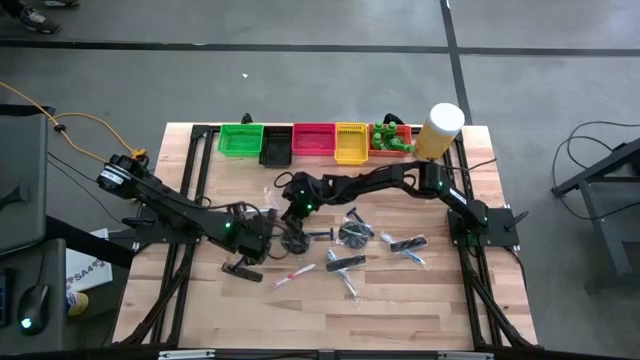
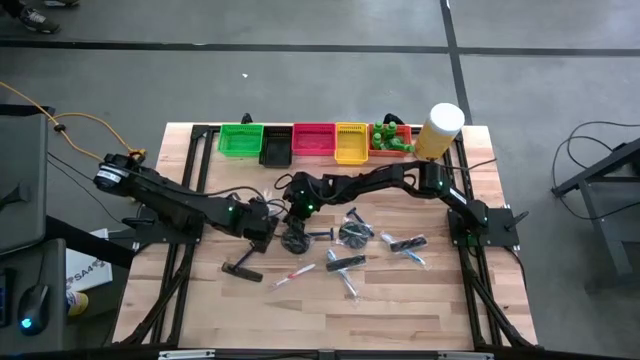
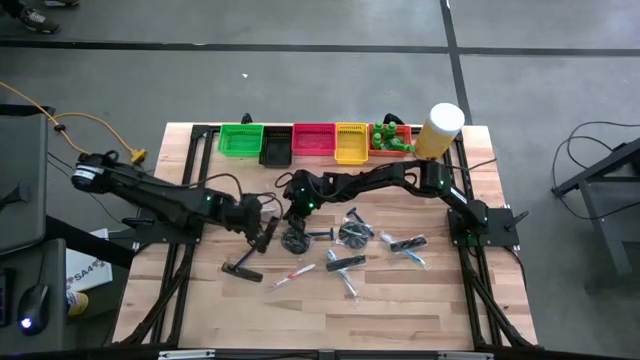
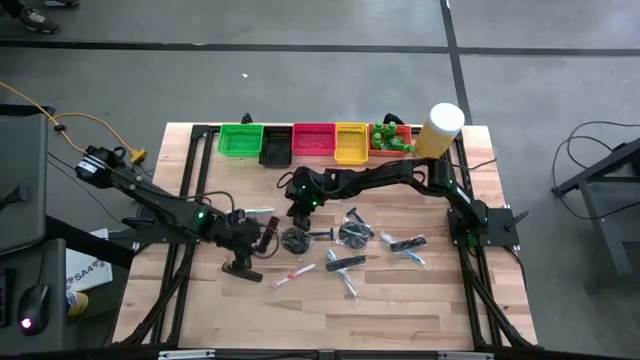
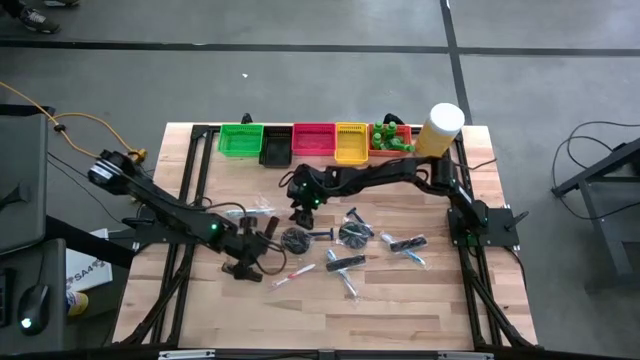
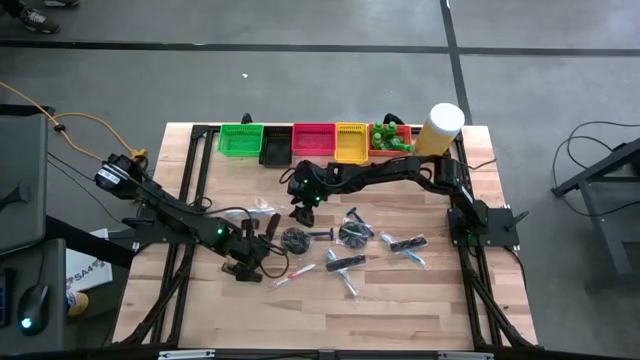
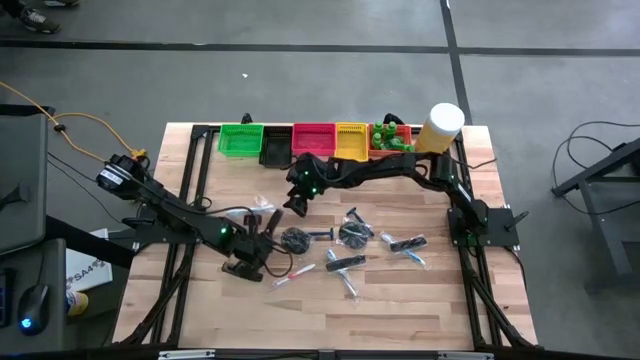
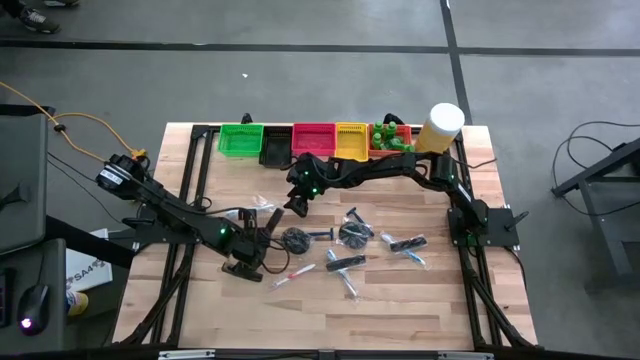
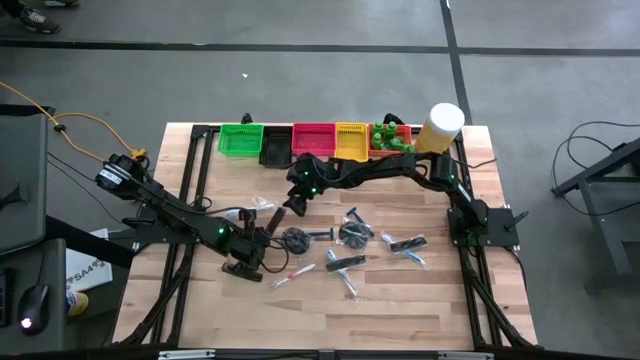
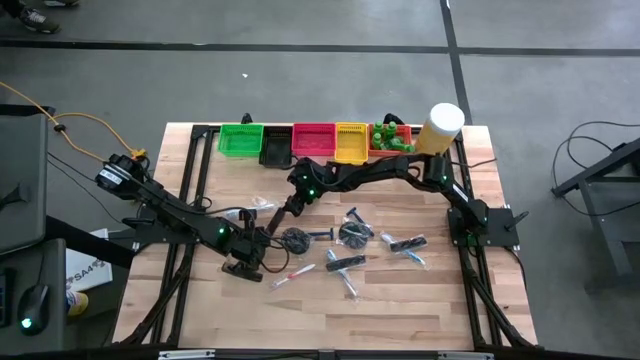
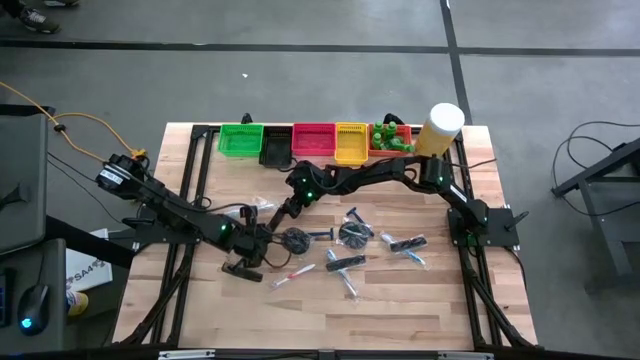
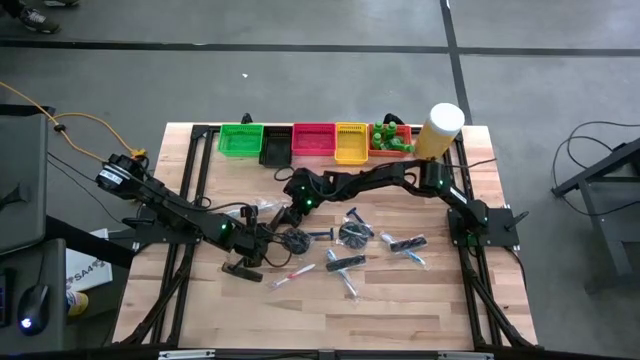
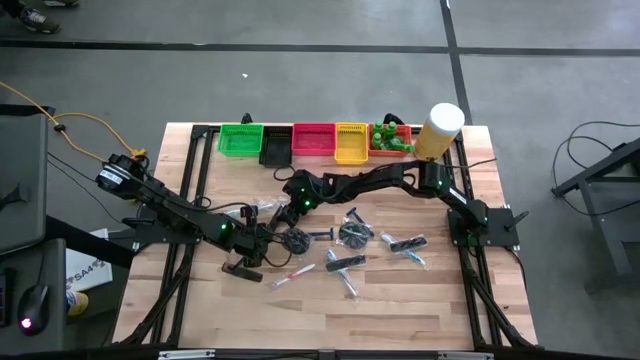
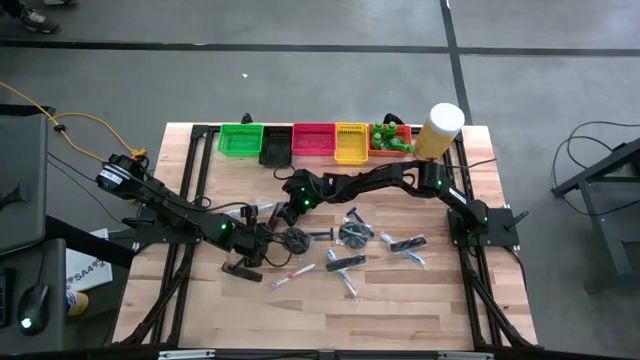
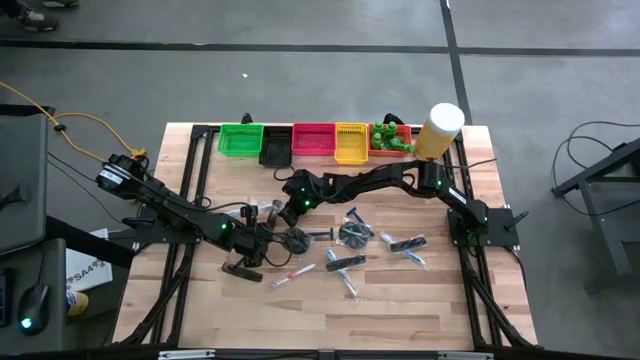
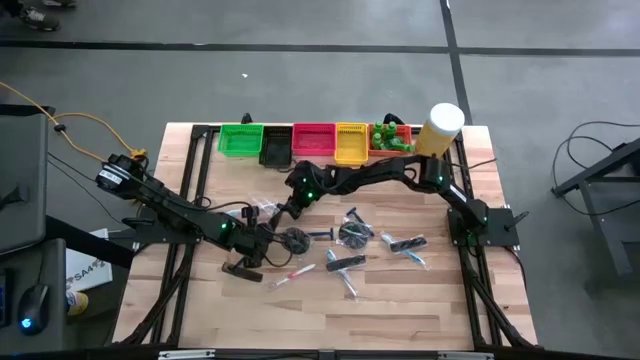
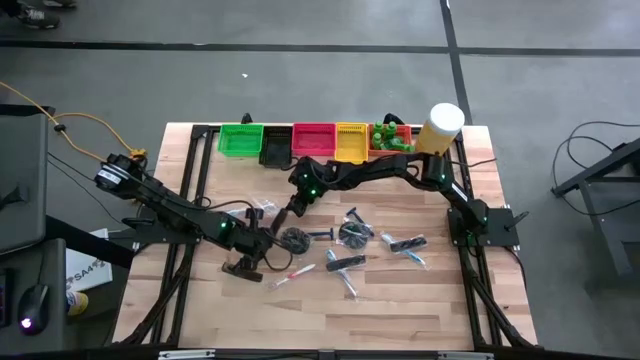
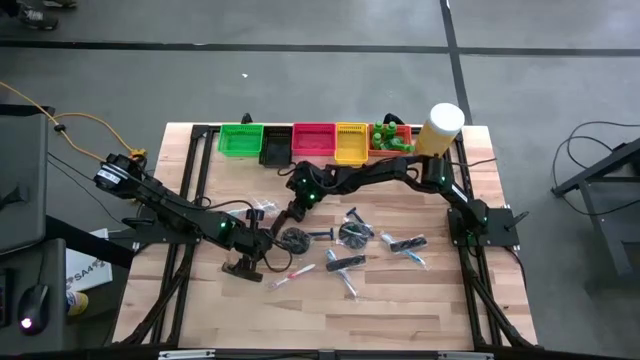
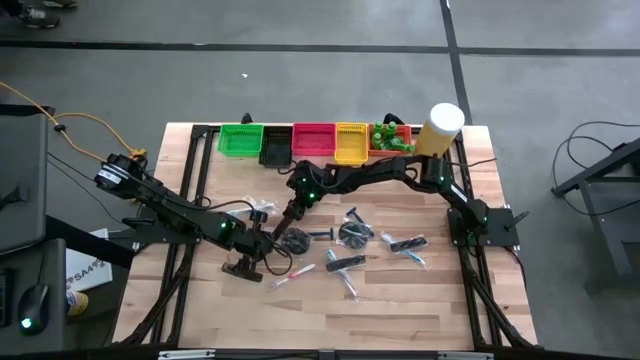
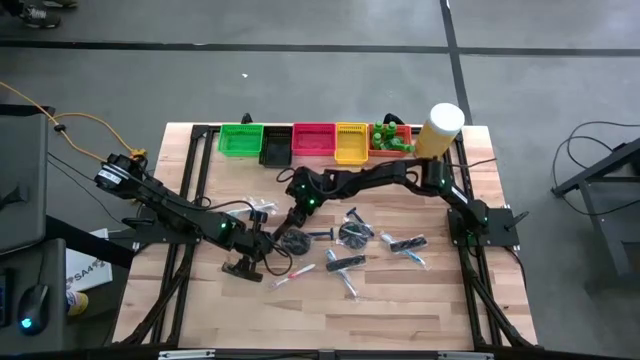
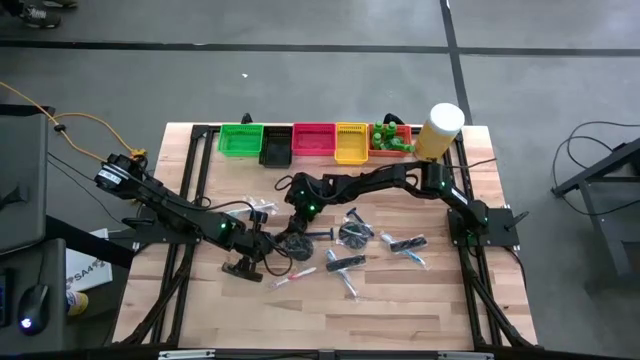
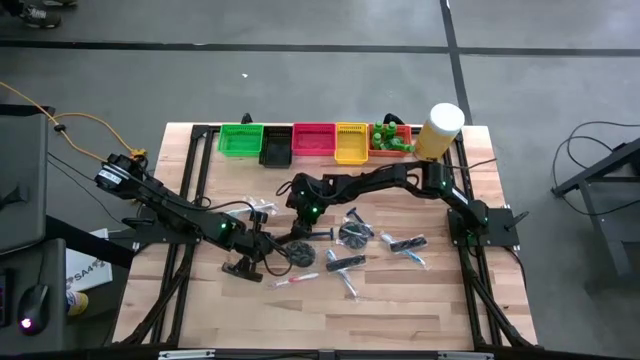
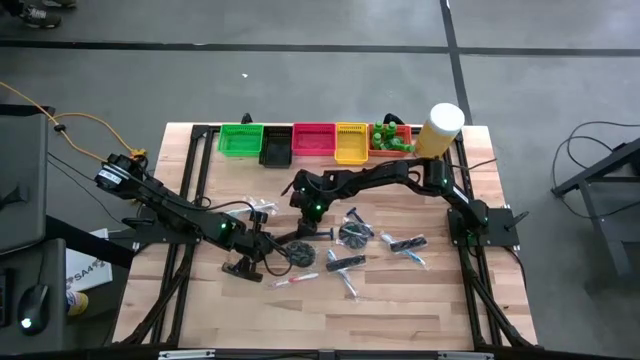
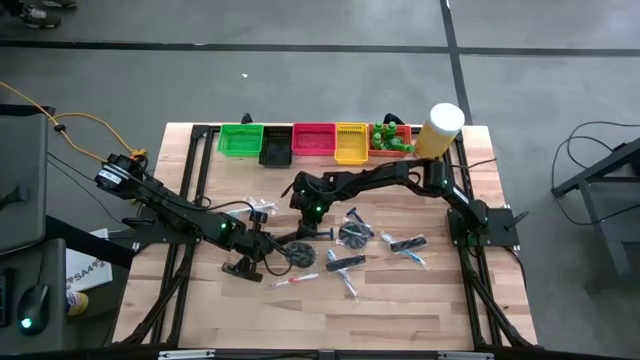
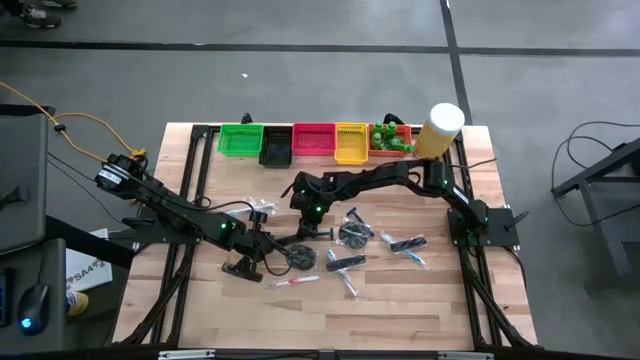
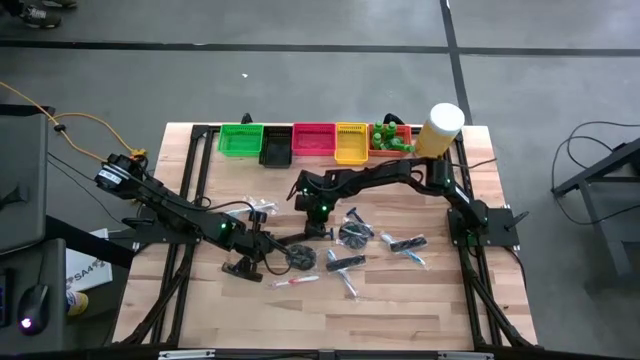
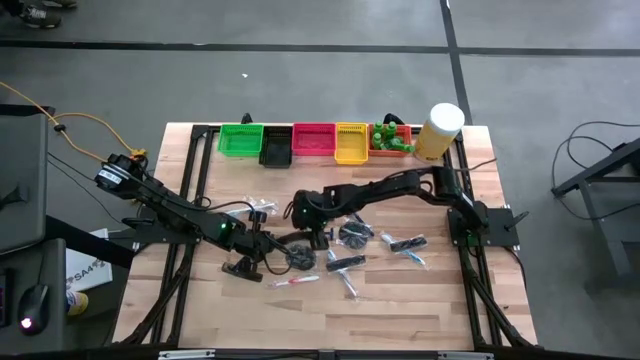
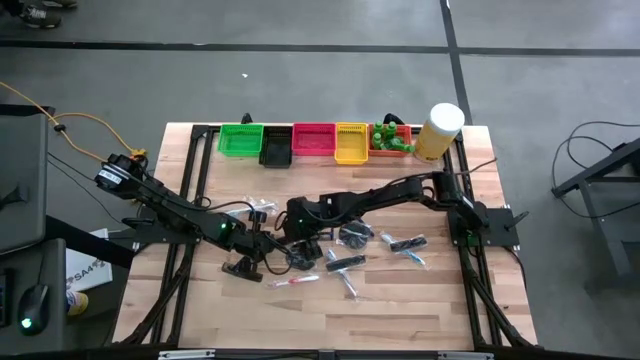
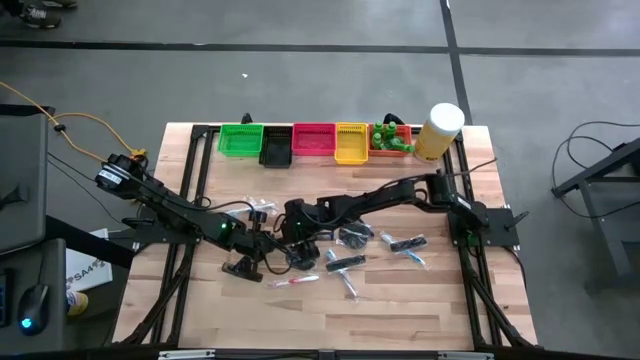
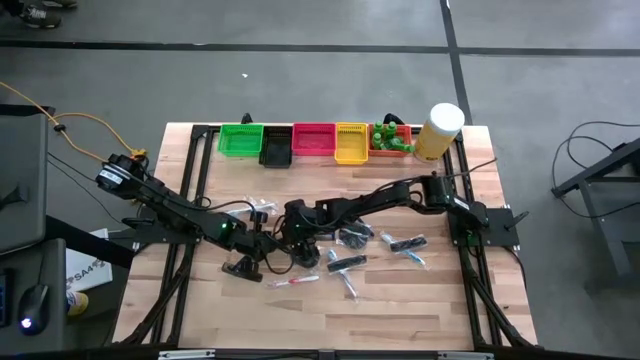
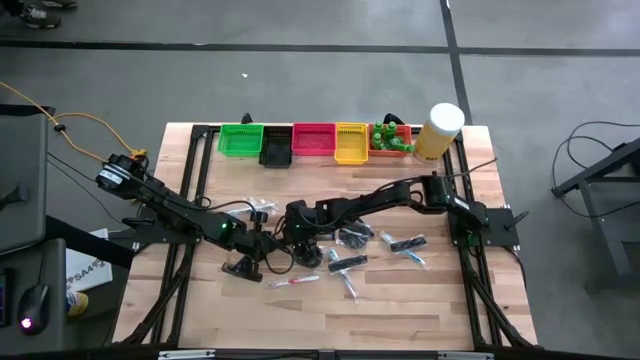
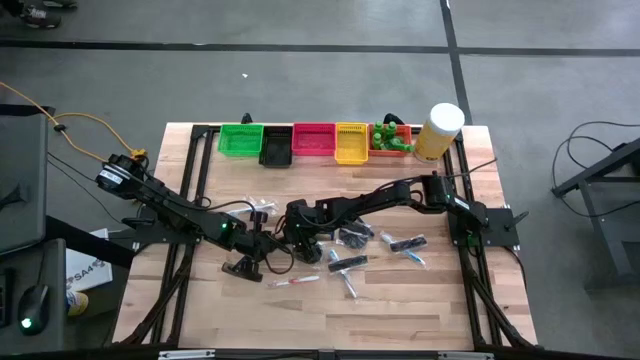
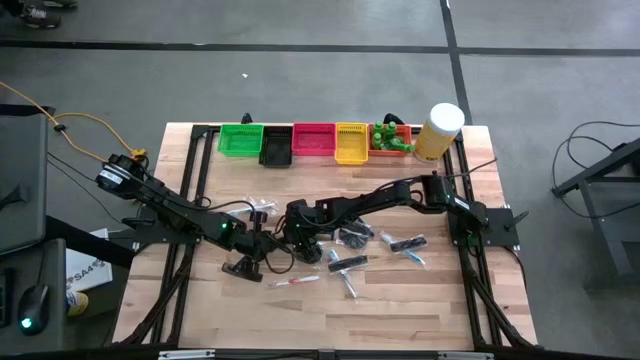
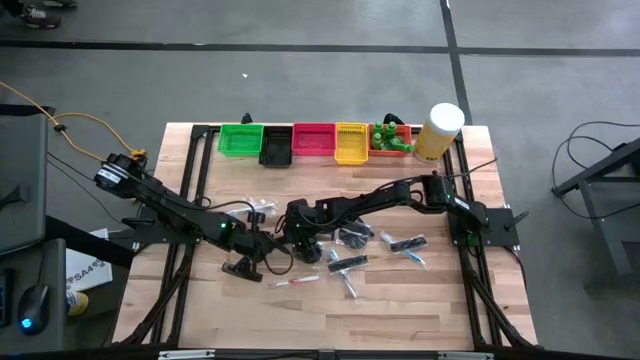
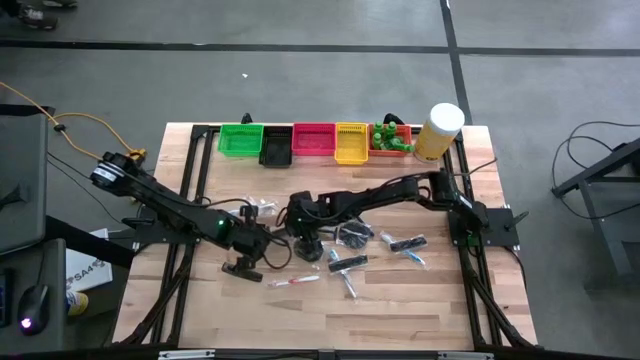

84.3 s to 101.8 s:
Task: Pick & Place Travel size toiletries
Put the black hair comb into the yellow basket

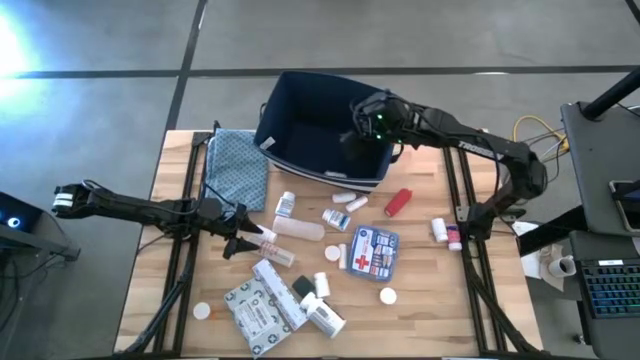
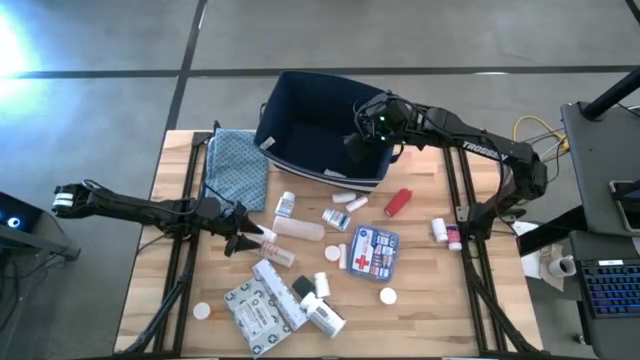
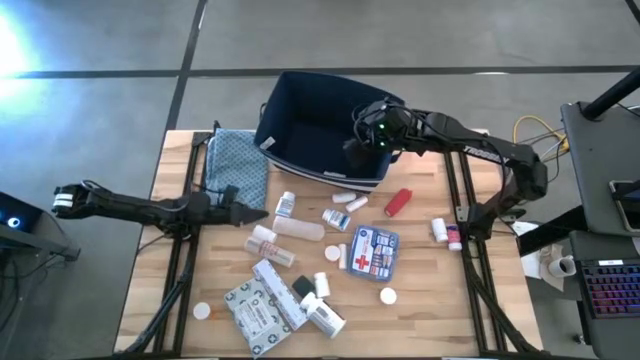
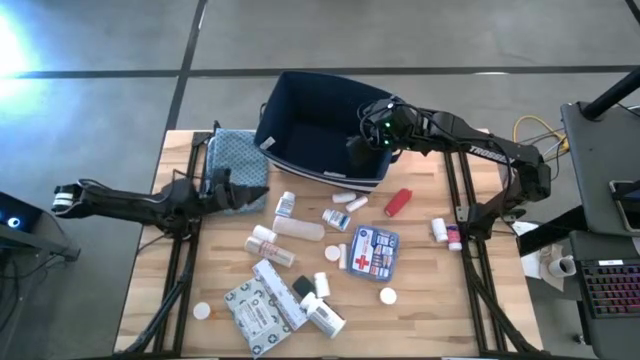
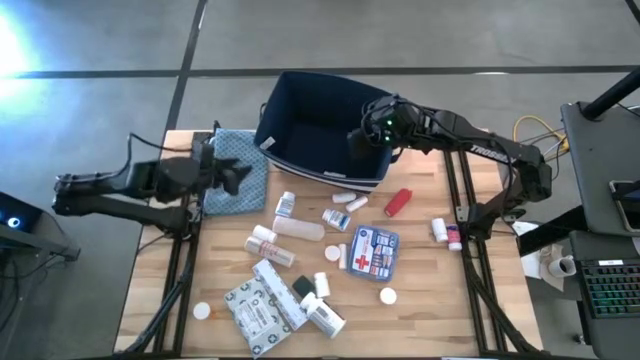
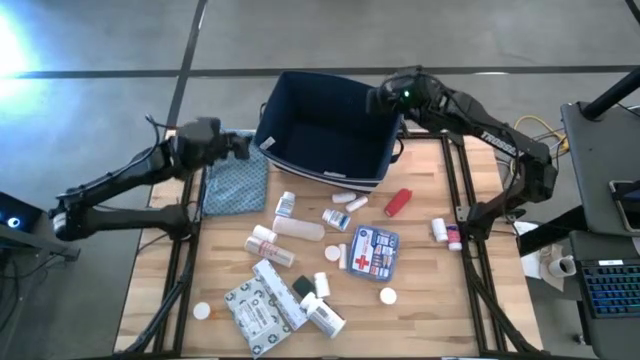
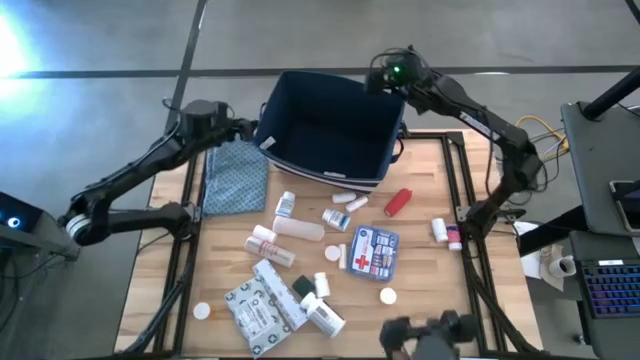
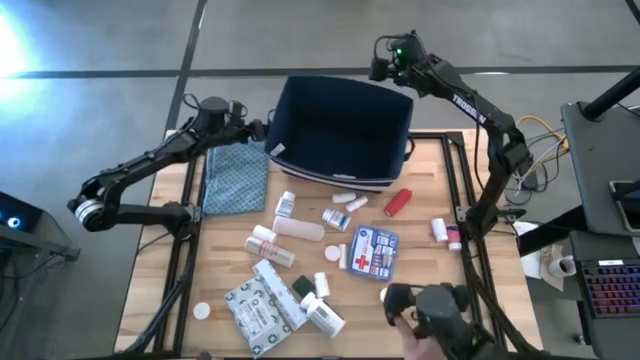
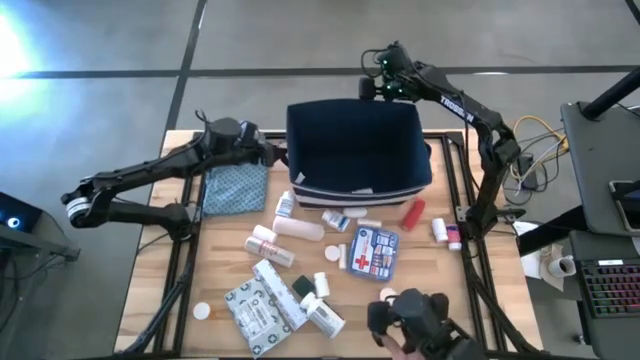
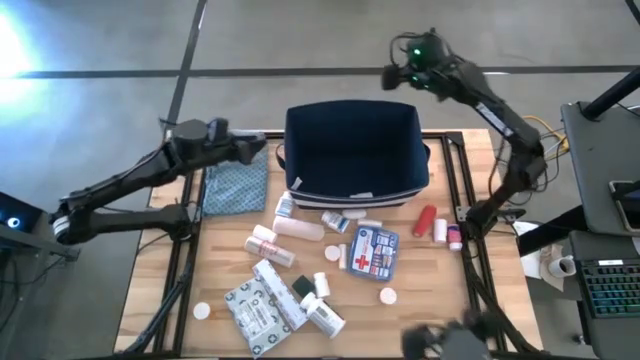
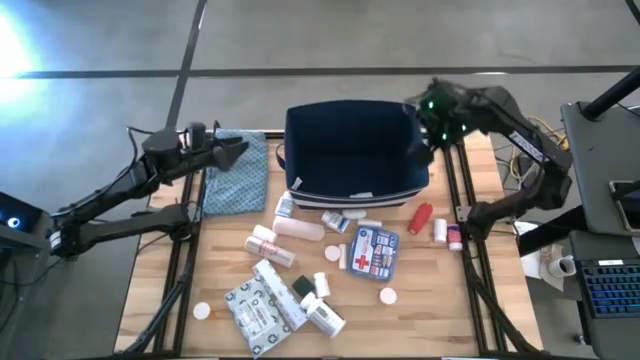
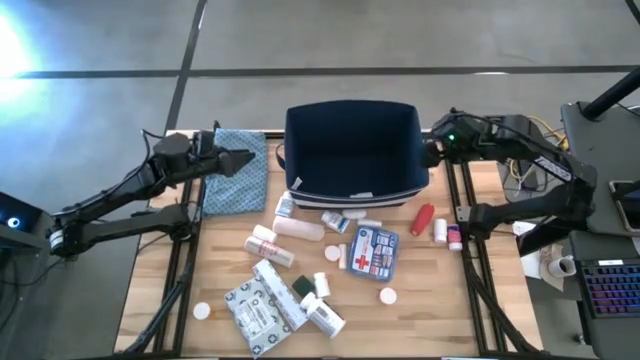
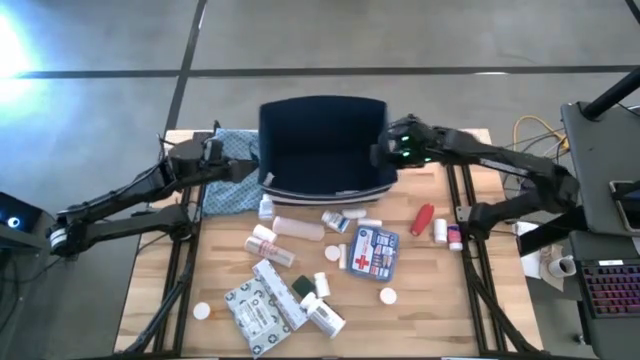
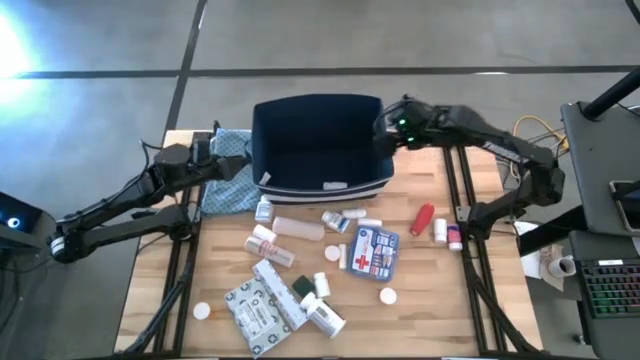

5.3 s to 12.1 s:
Task: Pick & place medical supplies in basket/bin
Adjust the blue bin
